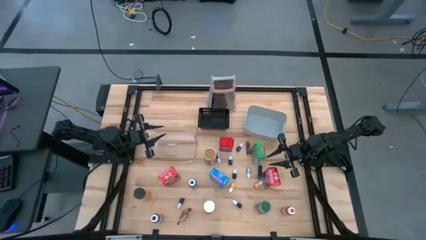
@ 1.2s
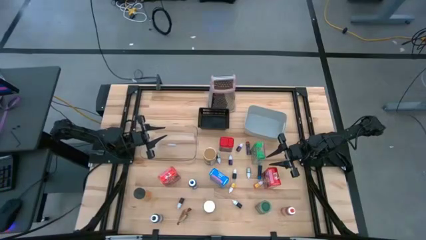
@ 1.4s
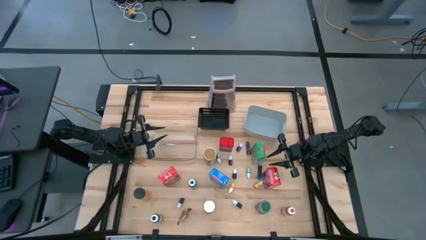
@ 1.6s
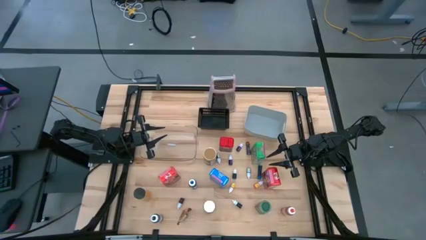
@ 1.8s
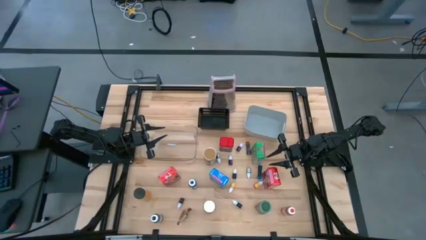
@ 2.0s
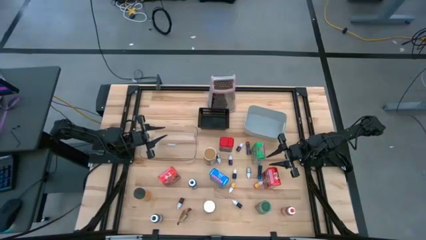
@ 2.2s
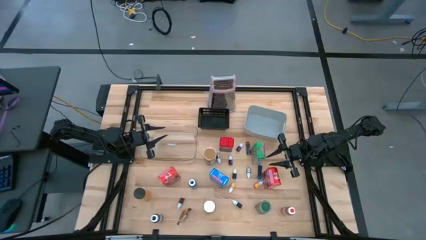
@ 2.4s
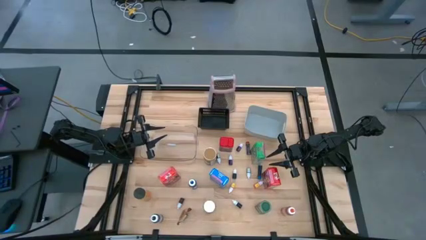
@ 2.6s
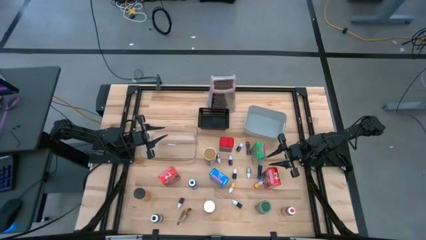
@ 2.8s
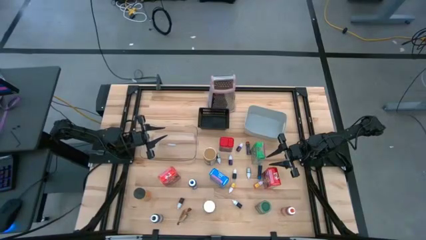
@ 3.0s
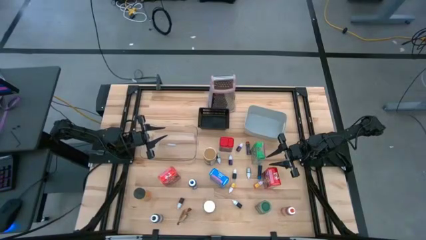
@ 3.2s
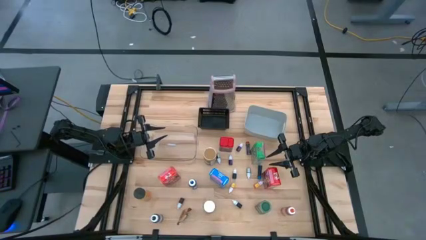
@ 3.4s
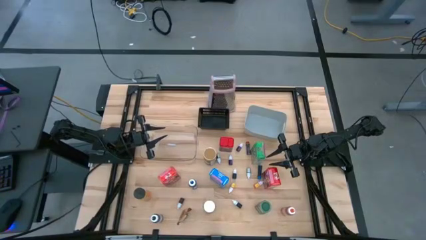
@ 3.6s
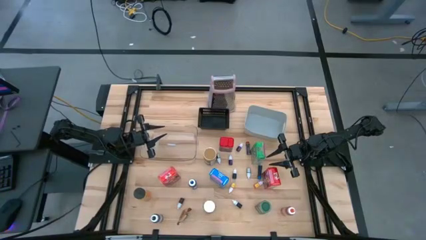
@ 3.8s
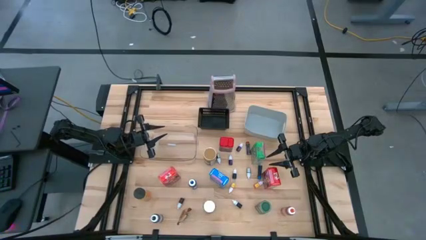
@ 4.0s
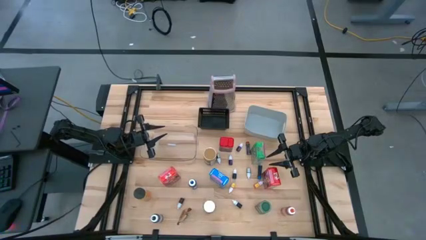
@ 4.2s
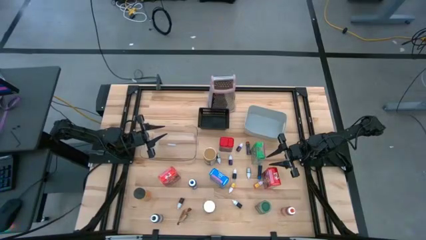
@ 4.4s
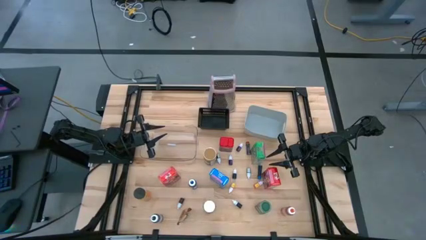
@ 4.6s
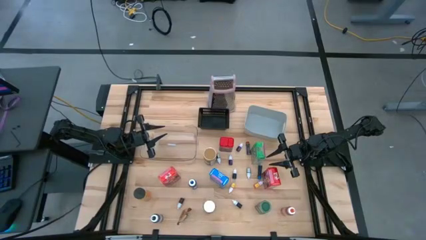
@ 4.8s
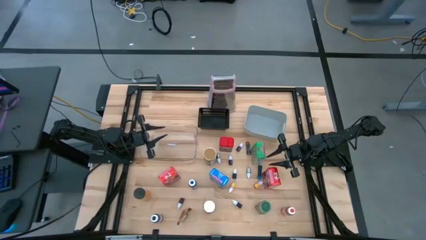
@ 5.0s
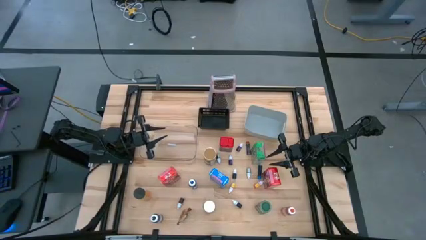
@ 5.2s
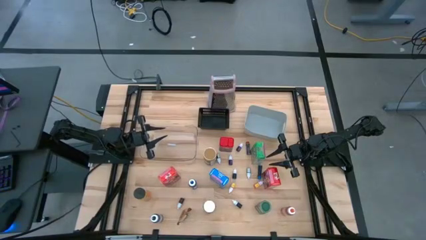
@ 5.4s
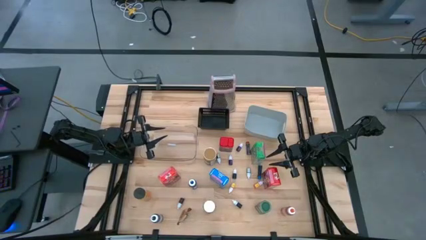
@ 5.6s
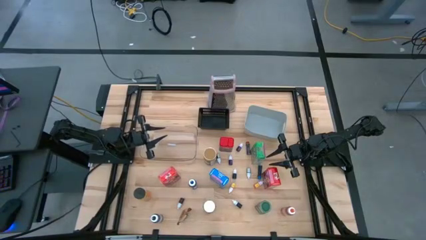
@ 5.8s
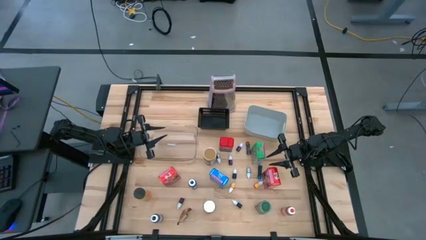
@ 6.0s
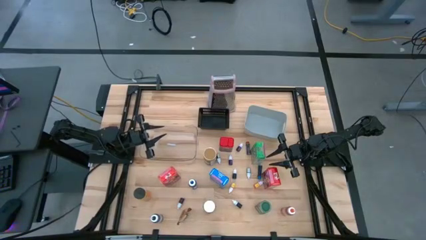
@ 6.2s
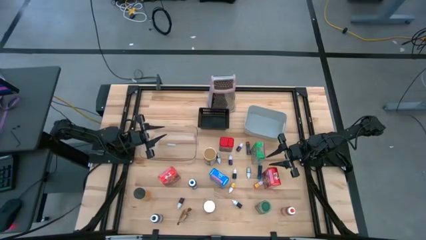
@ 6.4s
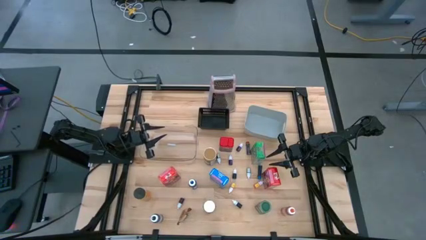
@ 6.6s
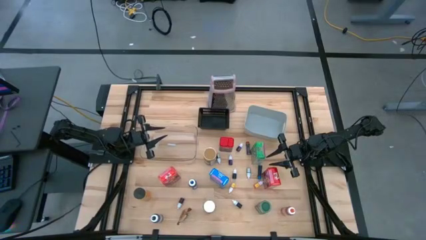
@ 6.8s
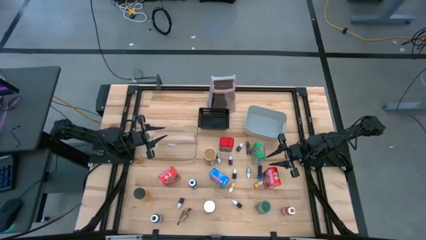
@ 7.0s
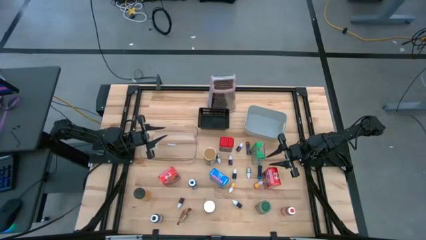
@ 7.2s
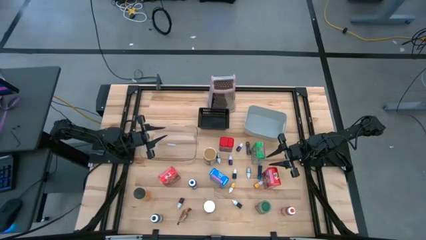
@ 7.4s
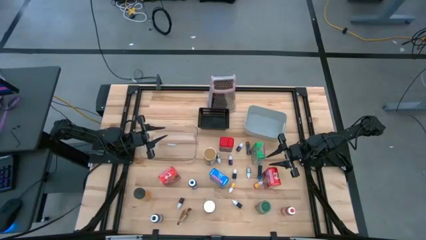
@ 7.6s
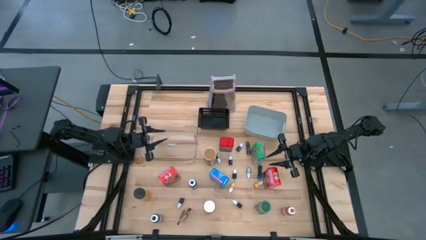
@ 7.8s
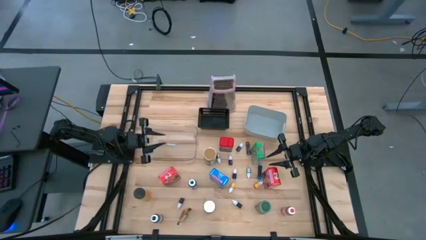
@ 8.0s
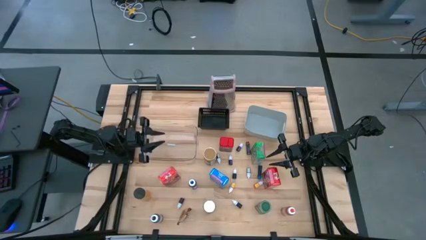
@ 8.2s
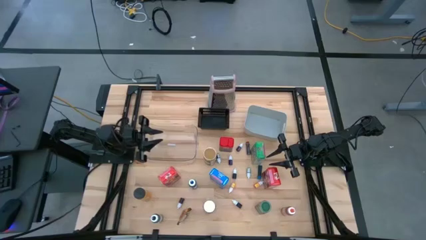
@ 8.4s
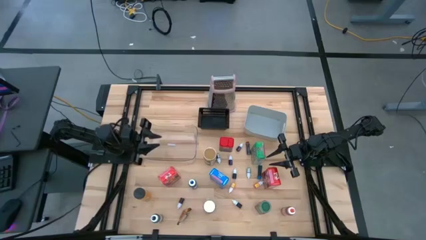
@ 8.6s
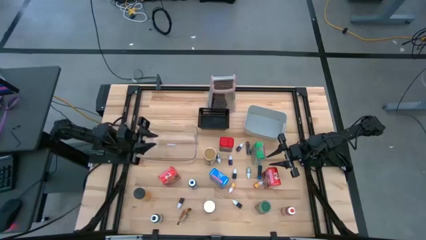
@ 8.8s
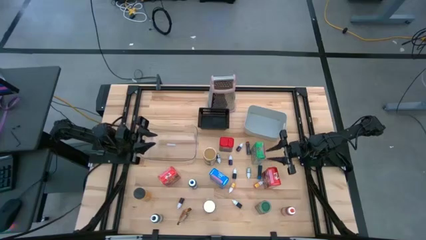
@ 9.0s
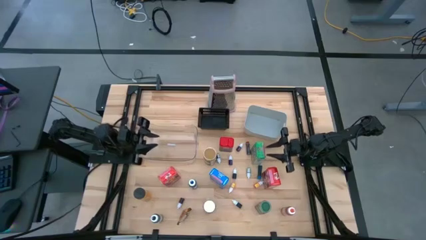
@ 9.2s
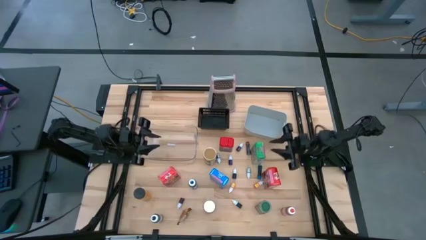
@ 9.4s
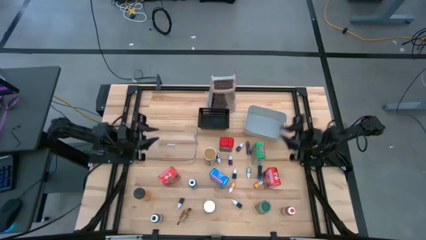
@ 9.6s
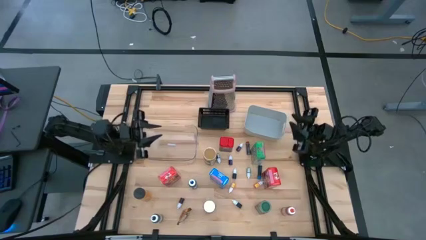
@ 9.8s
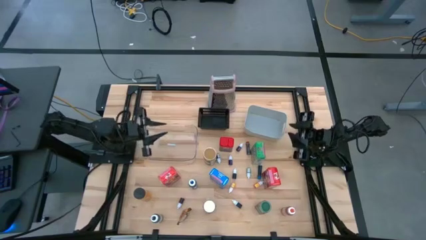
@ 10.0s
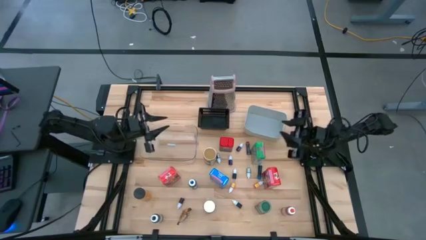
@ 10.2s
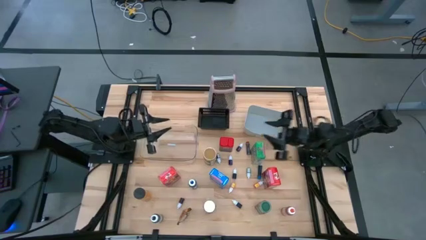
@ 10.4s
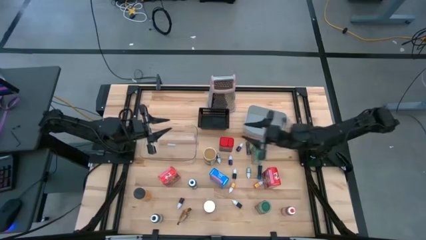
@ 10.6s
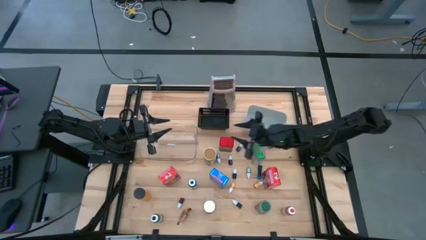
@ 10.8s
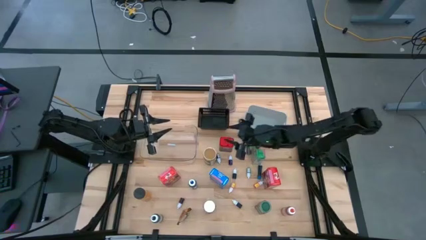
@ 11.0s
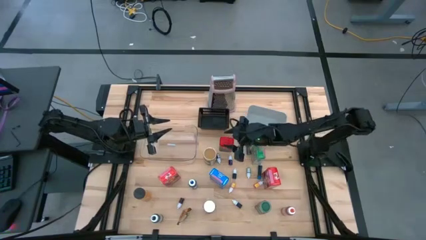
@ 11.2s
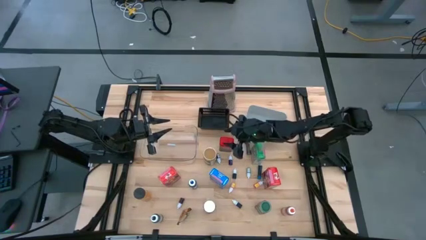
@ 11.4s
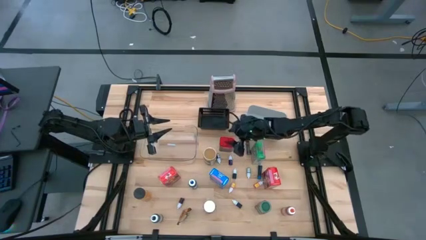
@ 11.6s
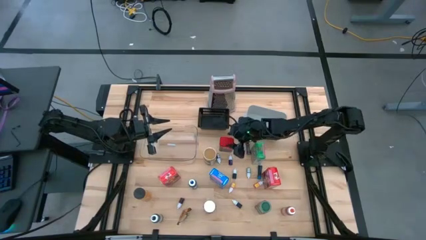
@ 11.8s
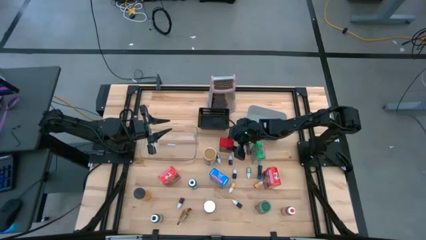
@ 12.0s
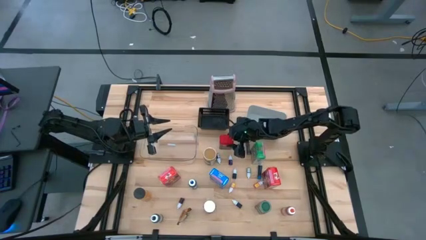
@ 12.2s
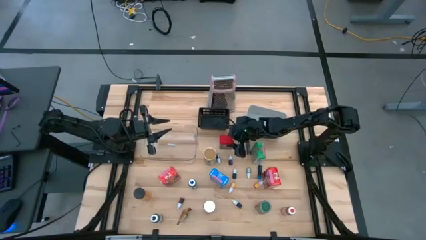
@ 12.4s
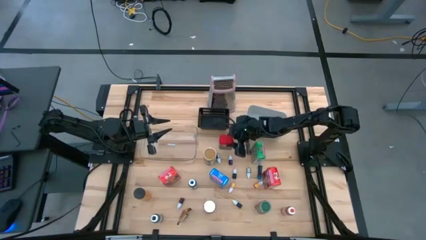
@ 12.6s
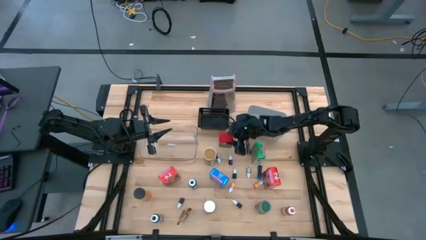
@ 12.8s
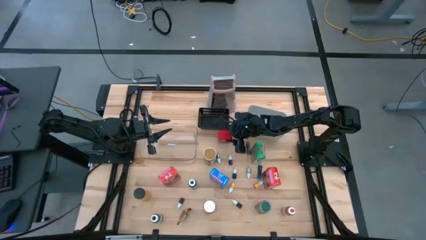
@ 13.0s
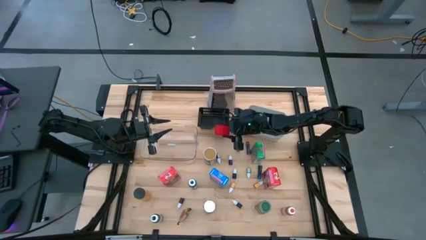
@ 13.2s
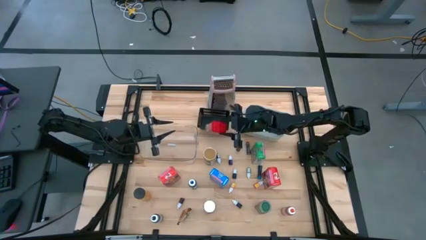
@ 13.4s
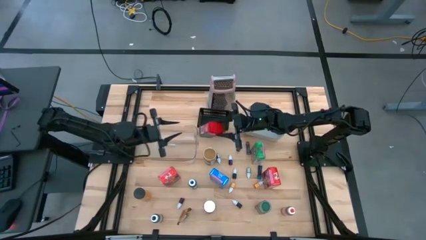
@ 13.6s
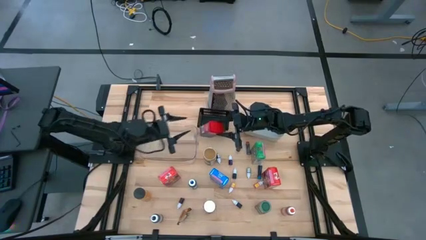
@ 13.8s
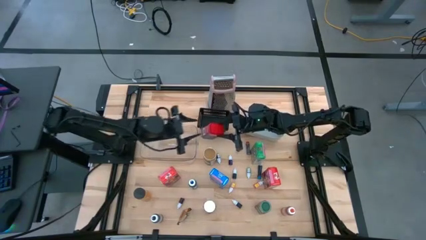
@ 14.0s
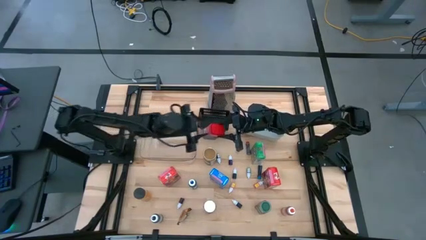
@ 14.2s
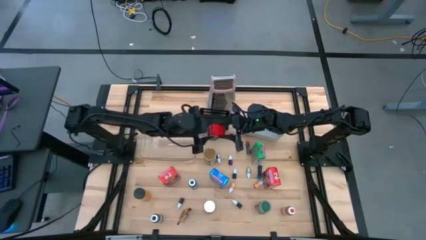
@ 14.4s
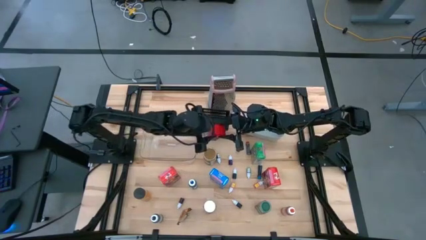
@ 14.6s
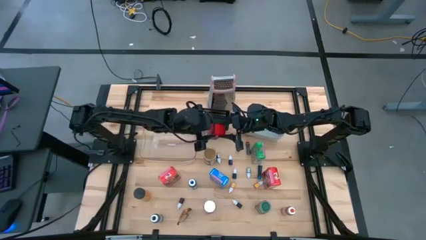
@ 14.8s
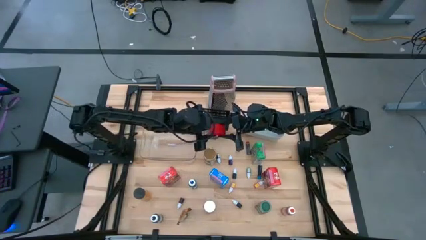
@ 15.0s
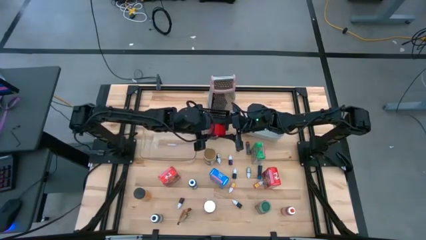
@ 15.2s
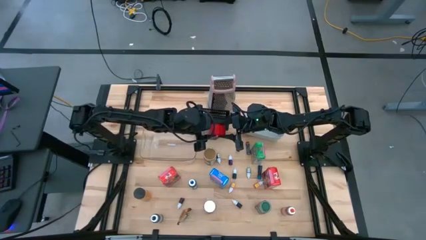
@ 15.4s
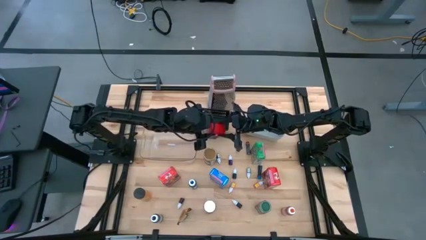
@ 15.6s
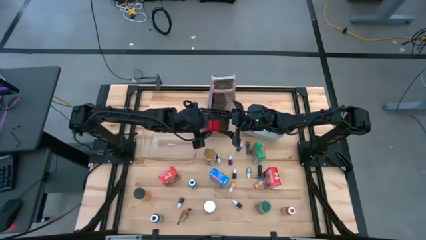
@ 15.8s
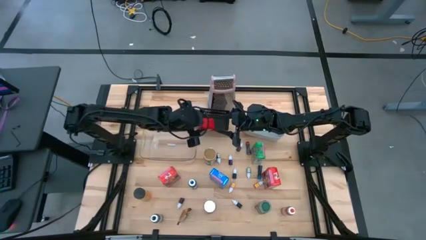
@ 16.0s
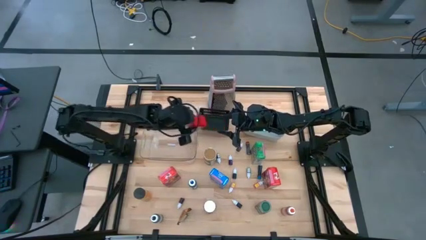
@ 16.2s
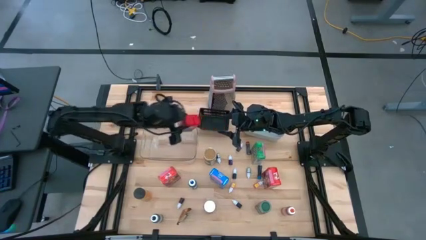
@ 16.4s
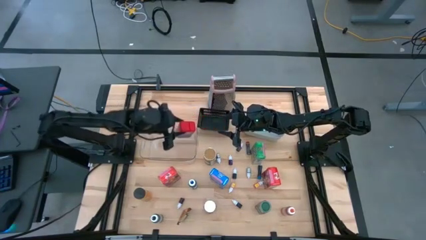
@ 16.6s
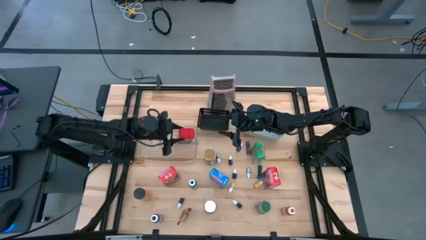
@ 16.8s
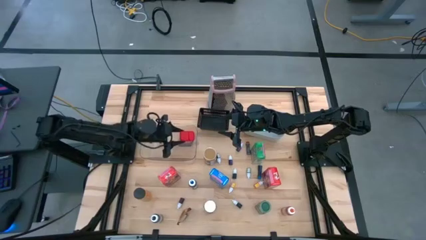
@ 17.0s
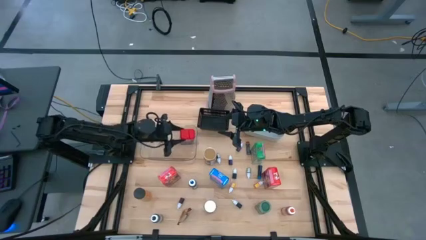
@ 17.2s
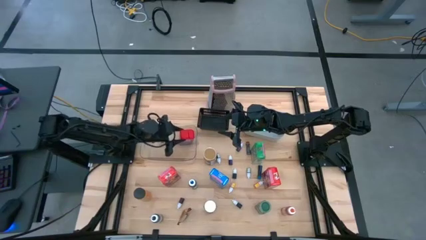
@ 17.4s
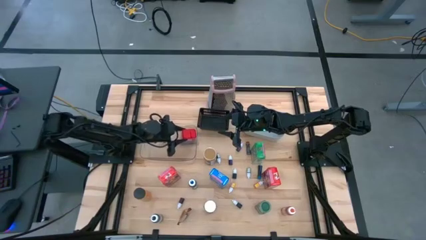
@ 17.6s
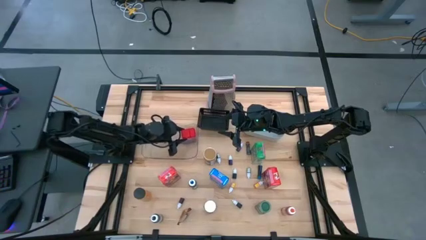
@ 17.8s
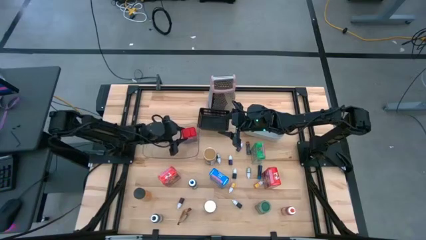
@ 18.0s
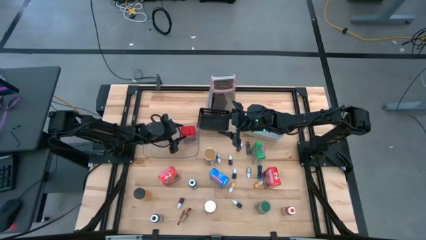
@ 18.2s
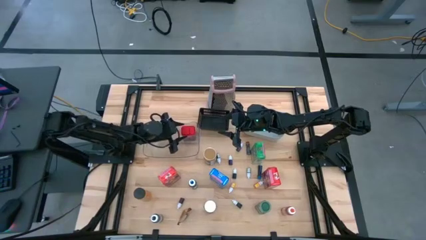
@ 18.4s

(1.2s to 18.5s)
Task: Pick & Place Kitchen Items
Put the red seasoning can into the transparent bin
